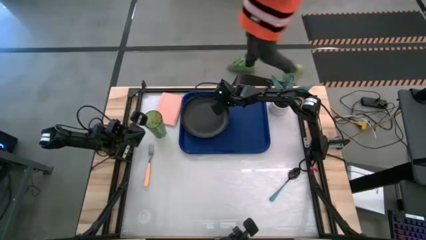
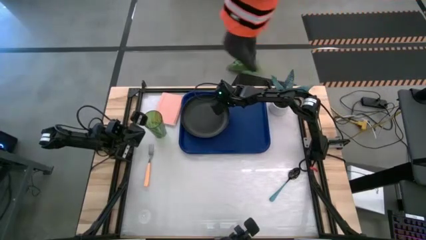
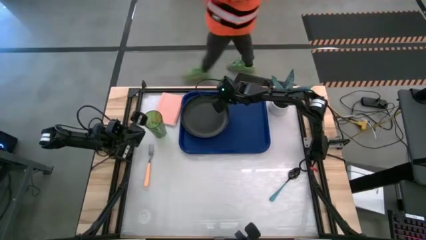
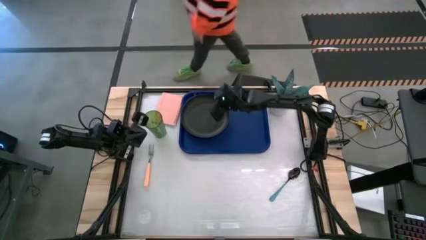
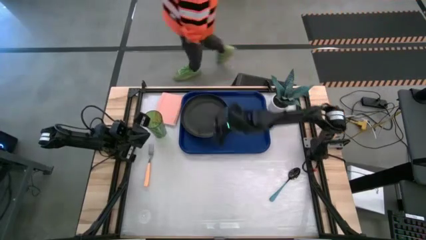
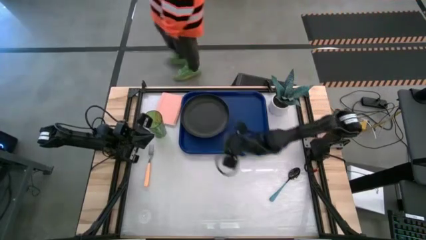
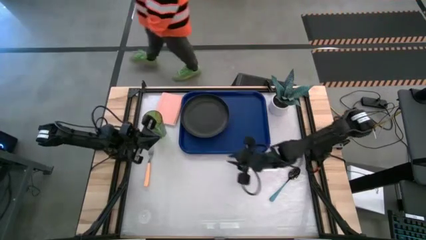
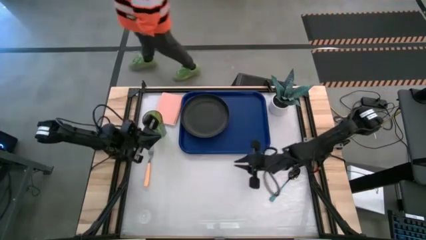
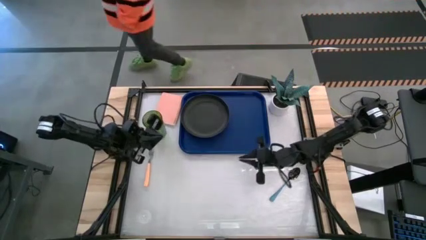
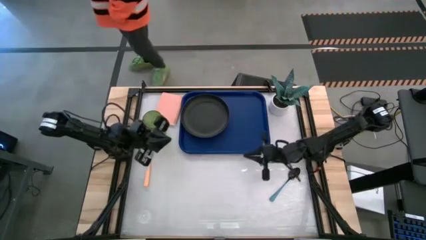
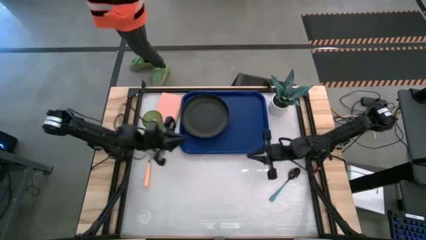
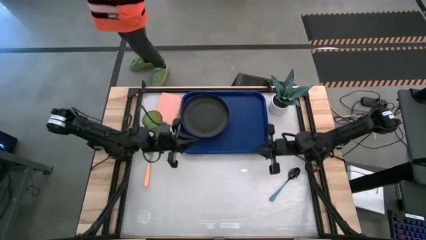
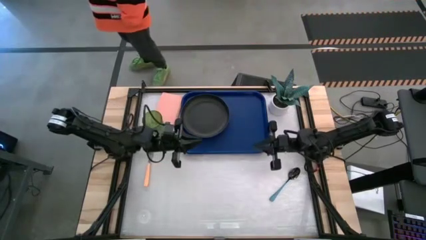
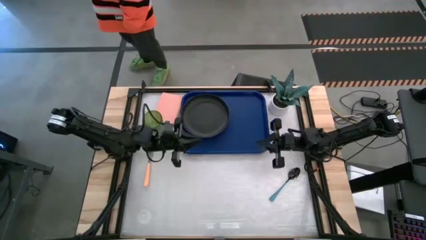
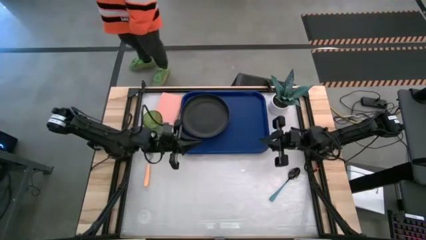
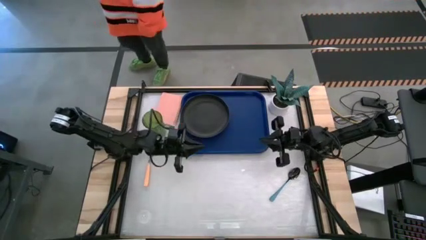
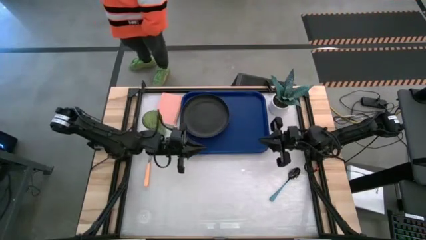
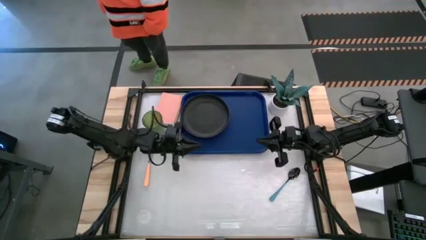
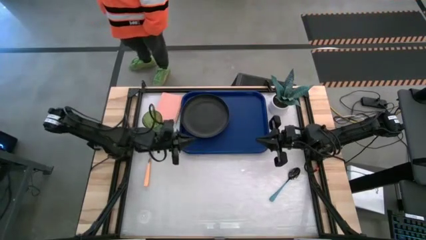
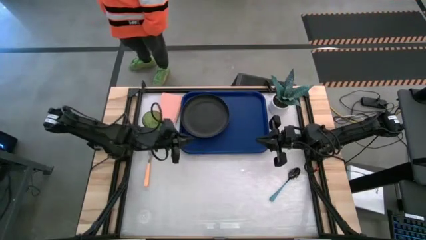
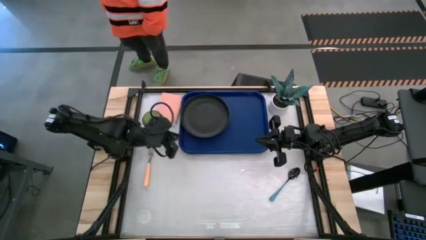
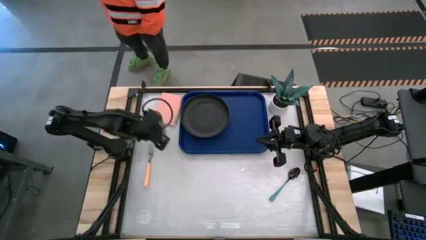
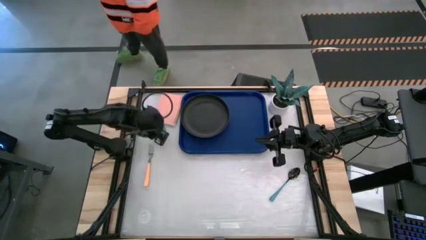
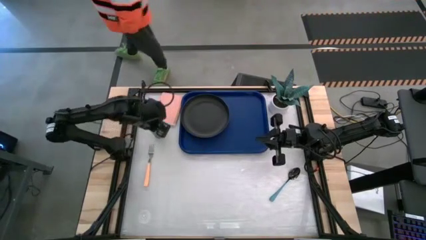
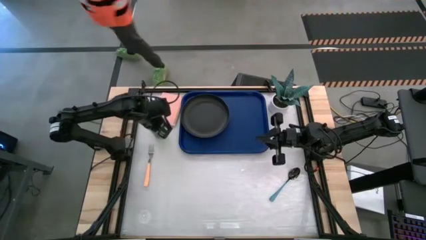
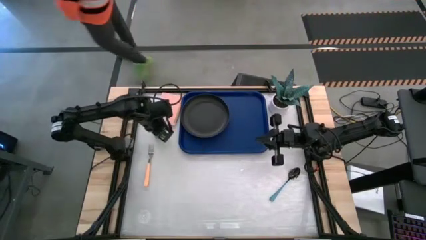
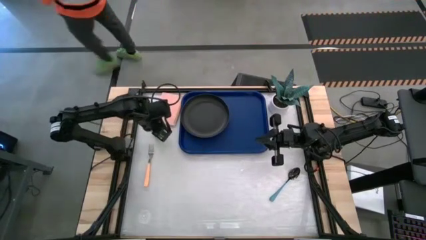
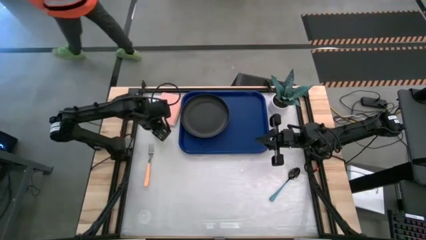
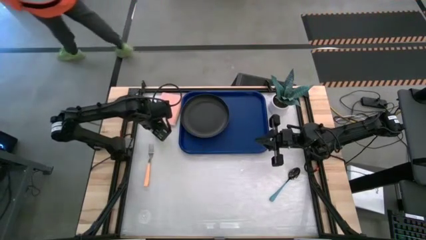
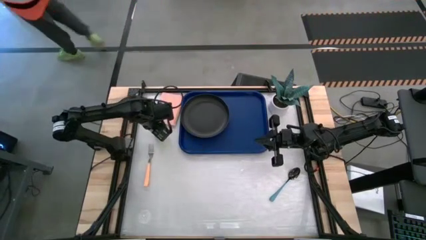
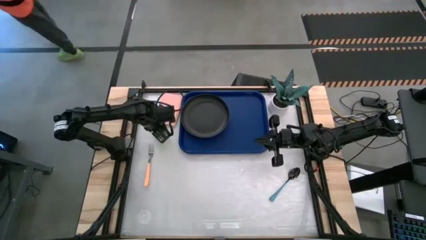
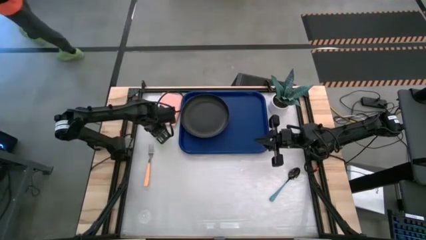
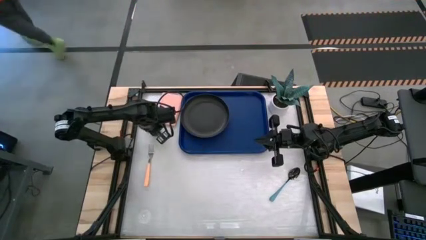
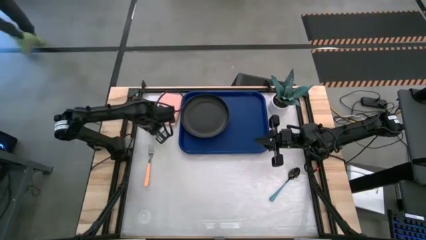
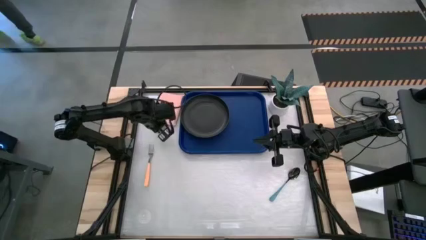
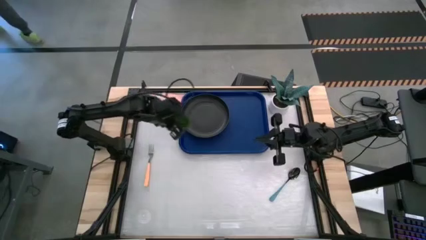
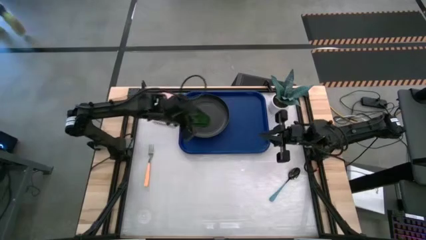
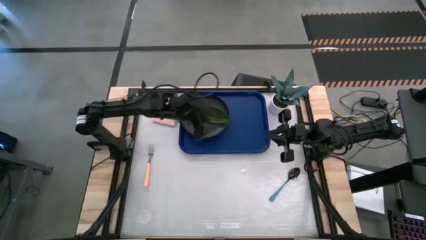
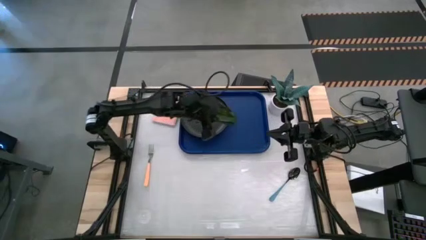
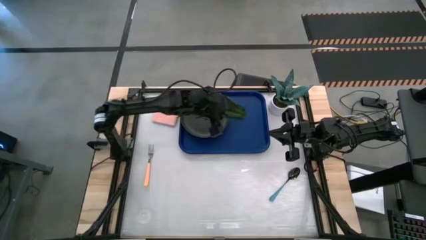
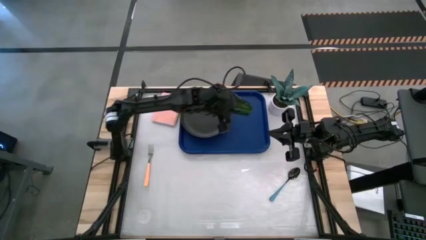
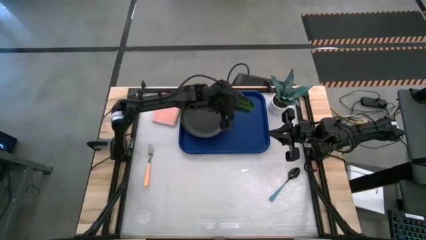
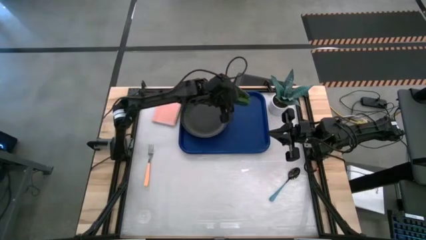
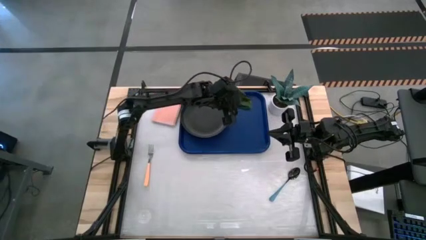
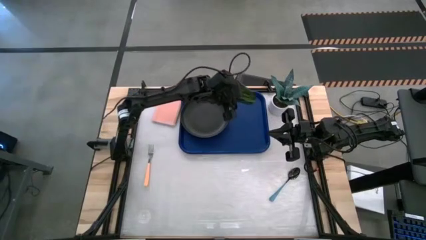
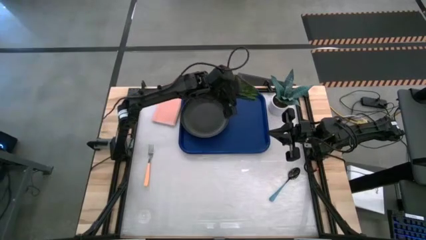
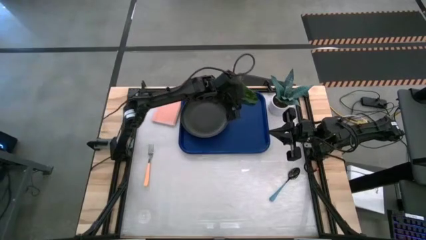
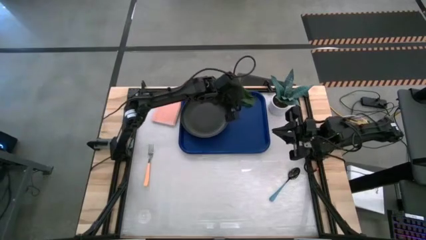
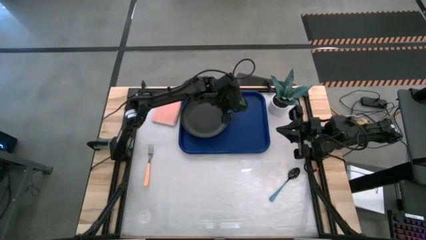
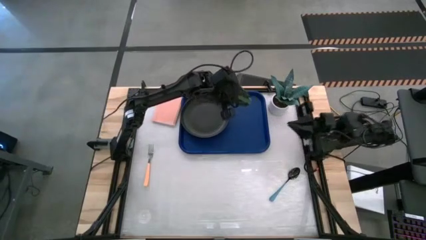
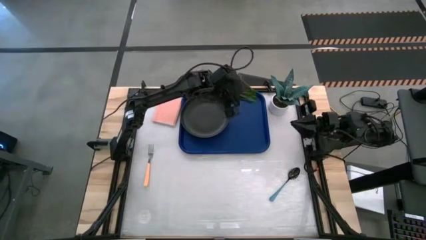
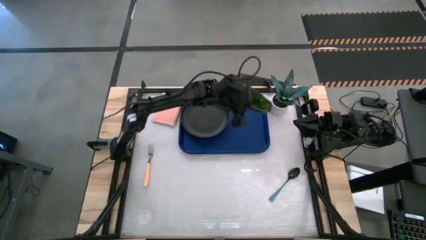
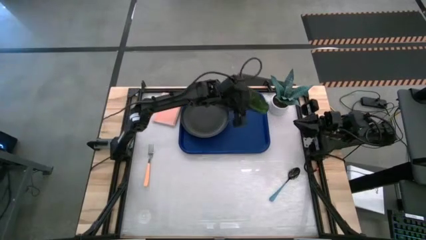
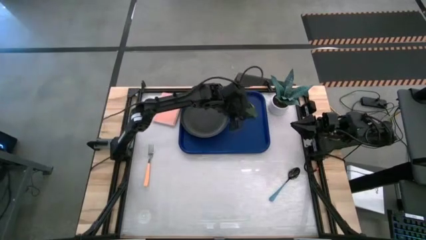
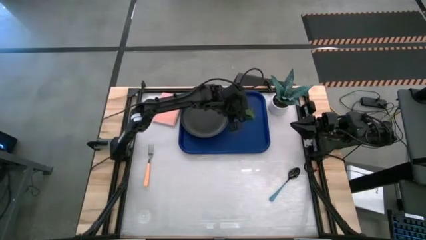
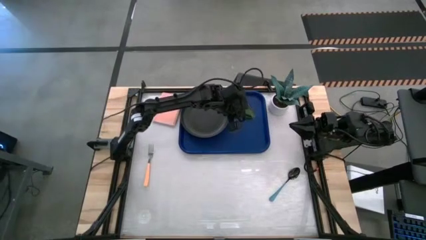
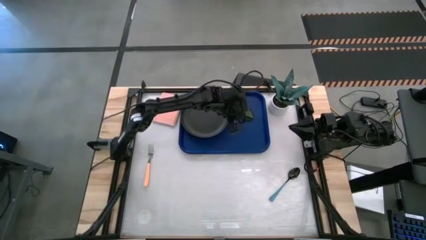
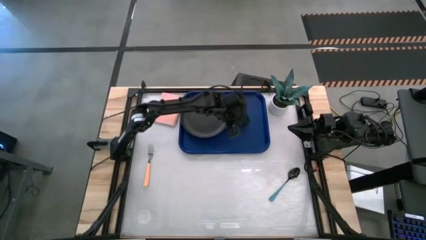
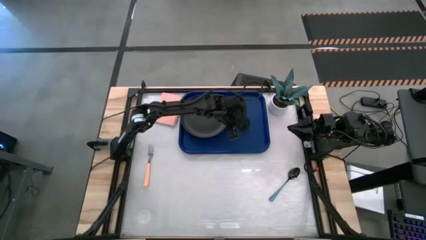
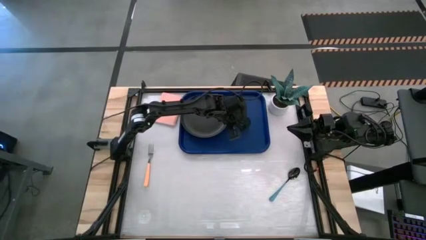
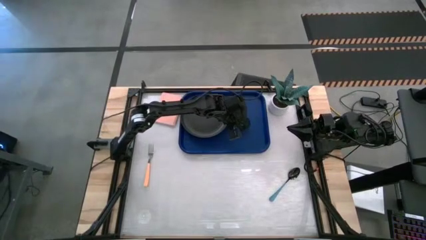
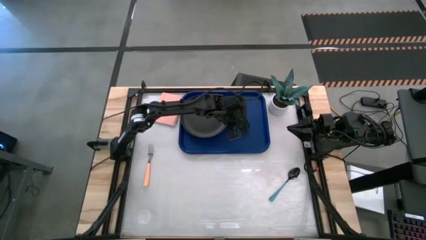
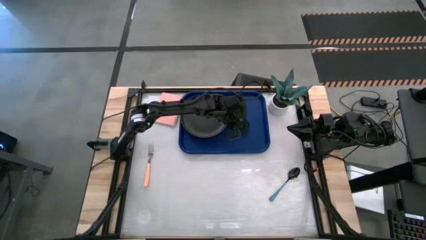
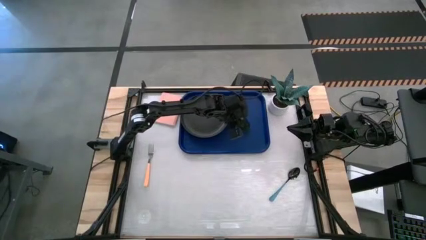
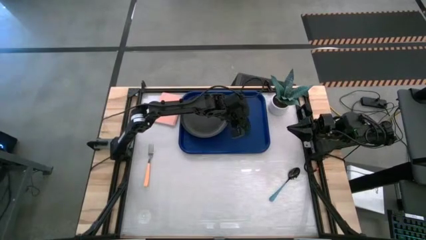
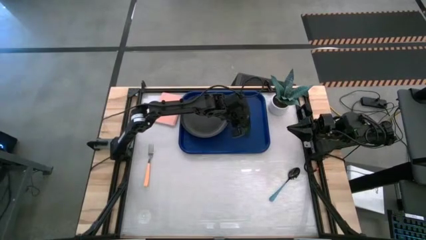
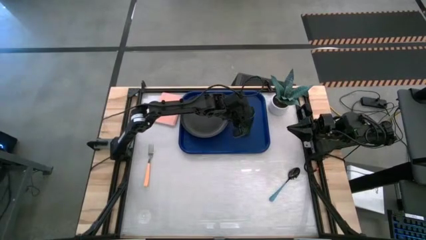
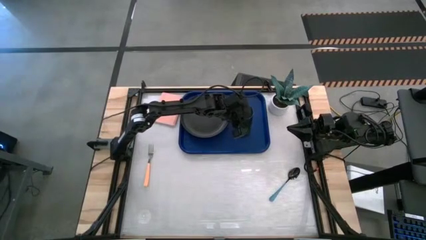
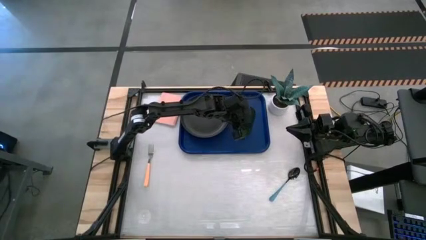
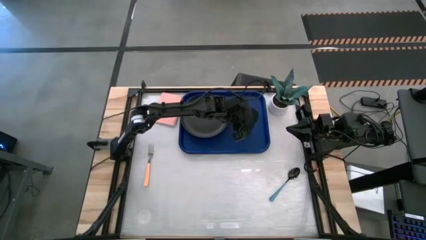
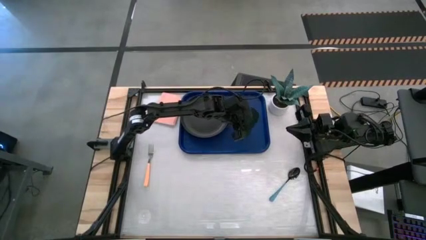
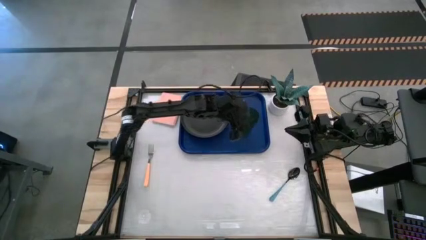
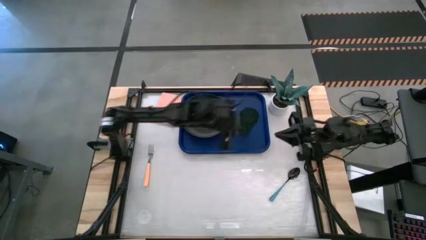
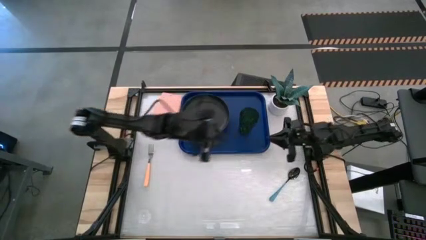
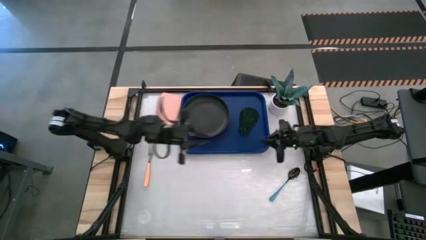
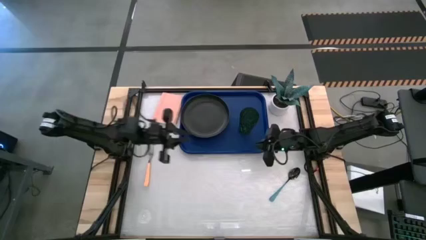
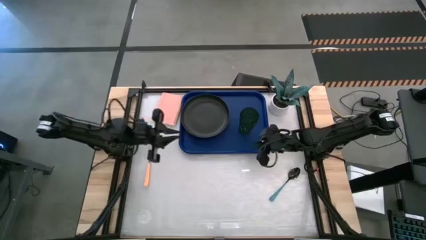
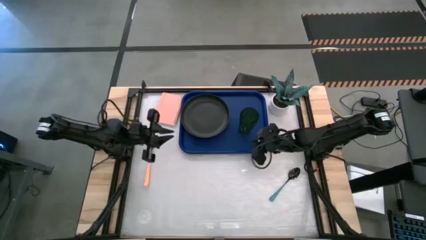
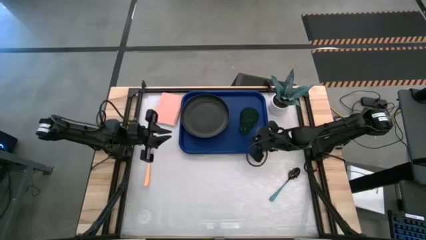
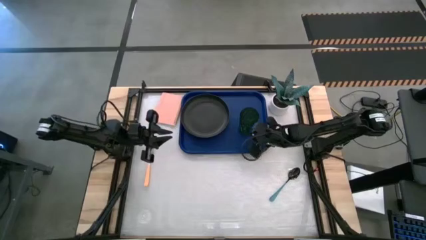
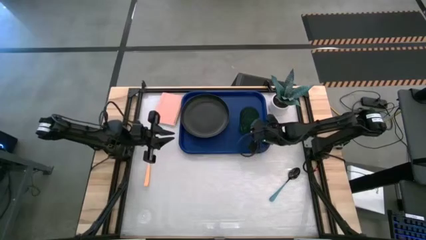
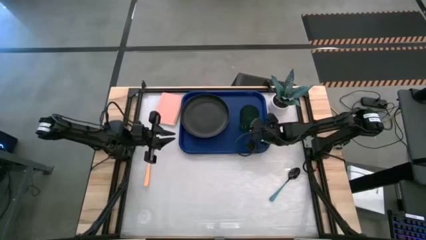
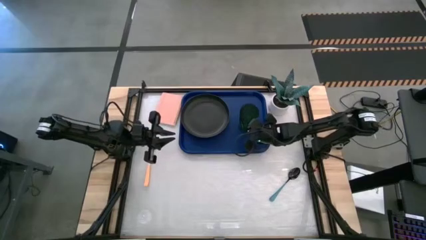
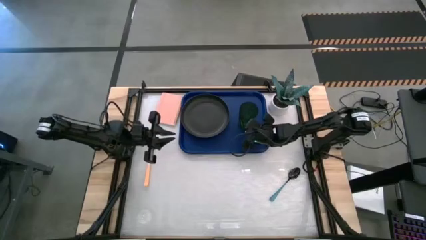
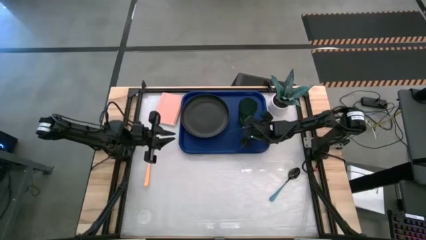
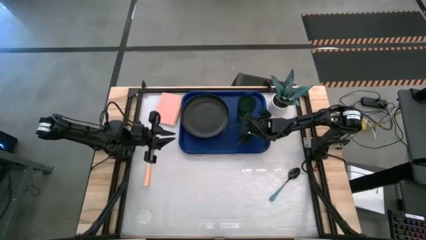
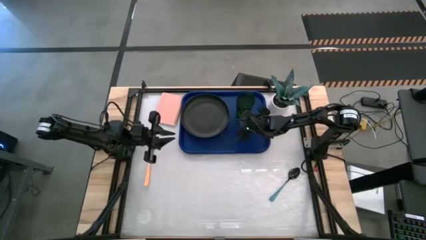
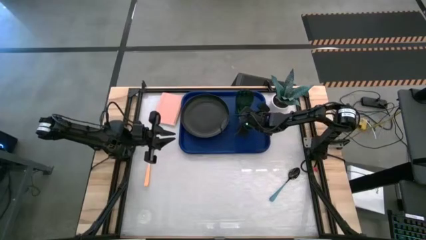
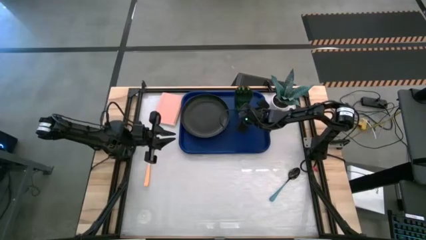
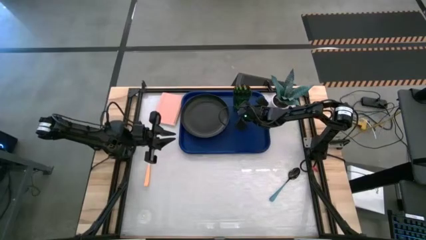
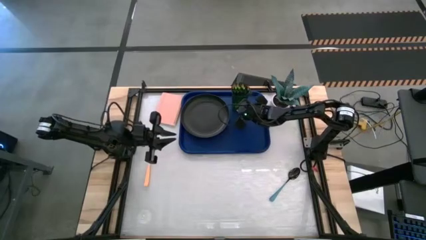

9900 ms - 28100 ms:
Task: Pick and place plate/cup/fork/spoon on tray
Put the green cup on the blue tray to the top right of the black plate
